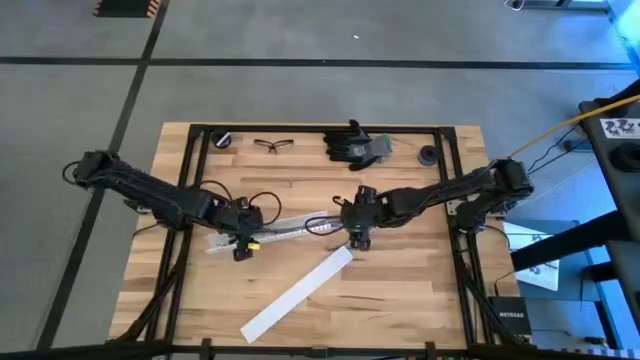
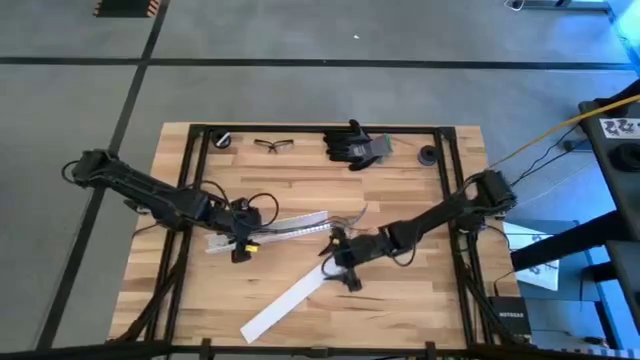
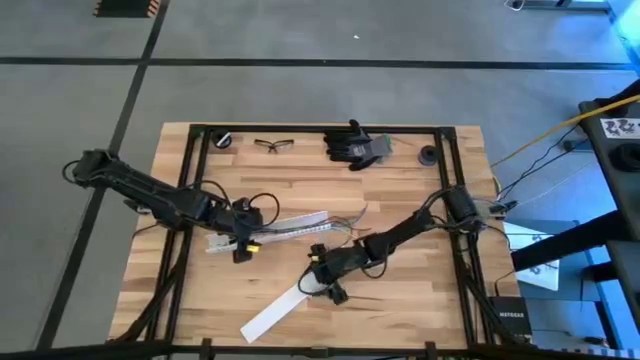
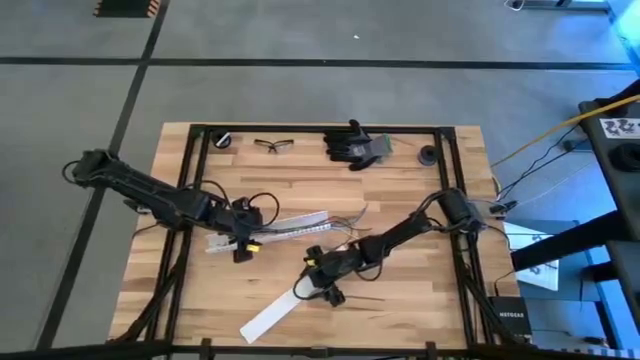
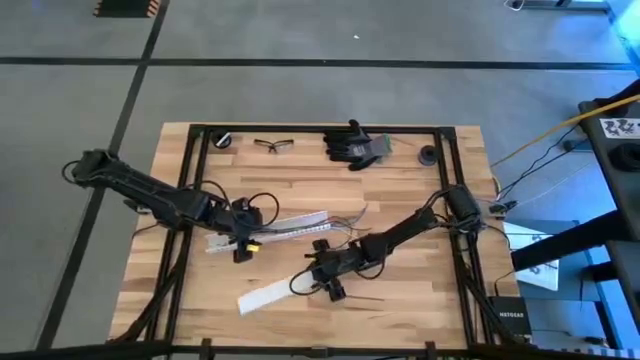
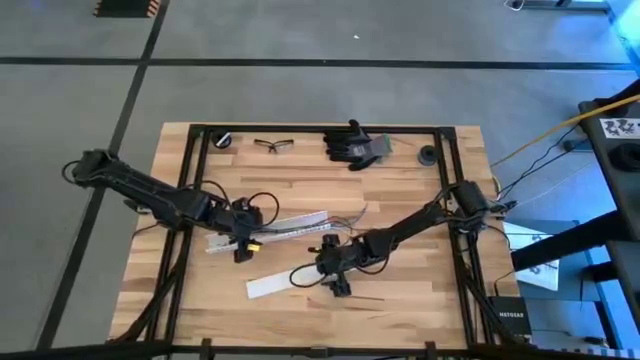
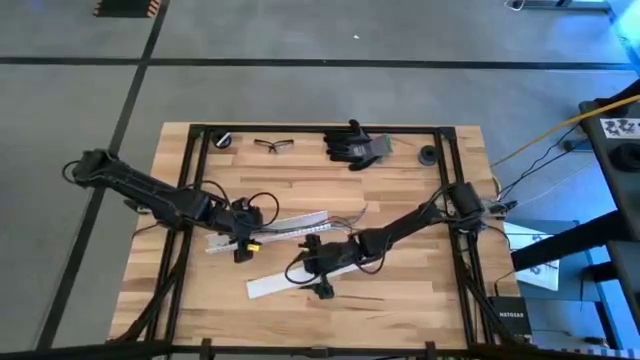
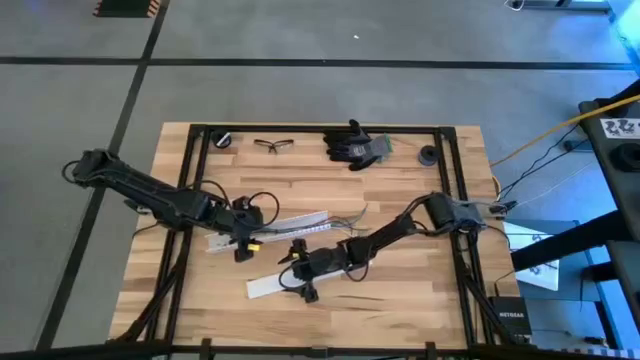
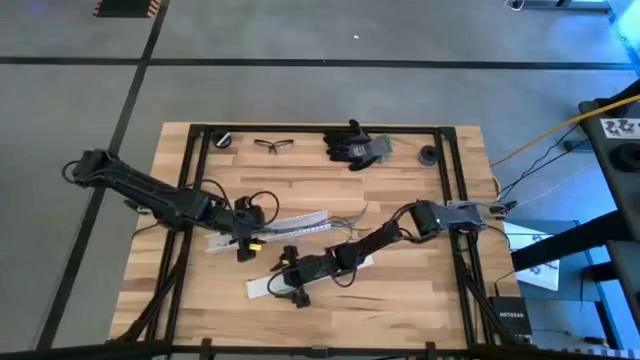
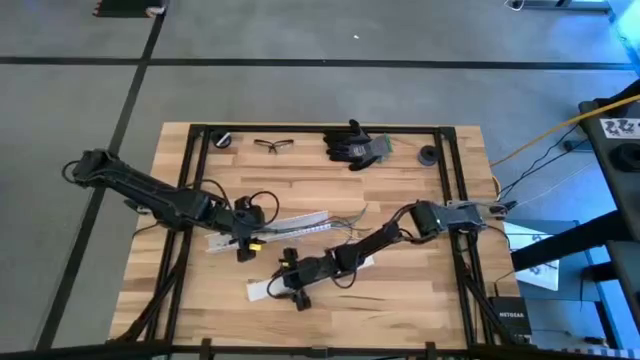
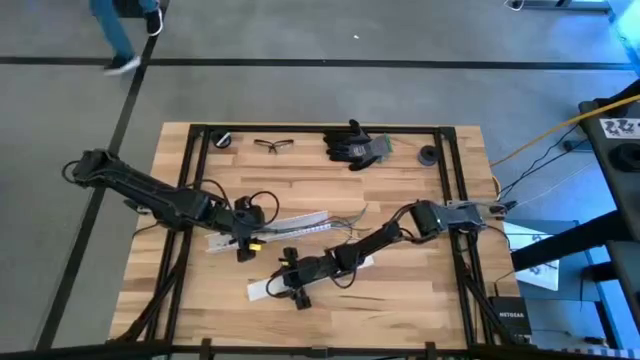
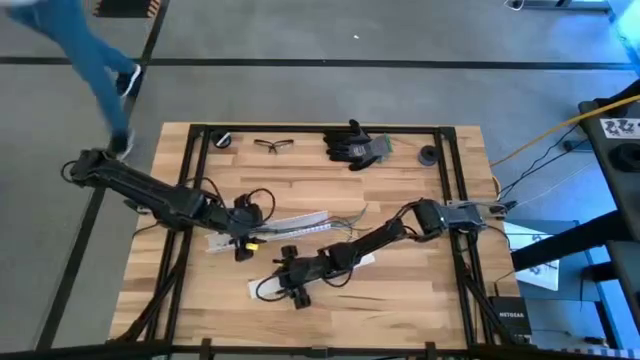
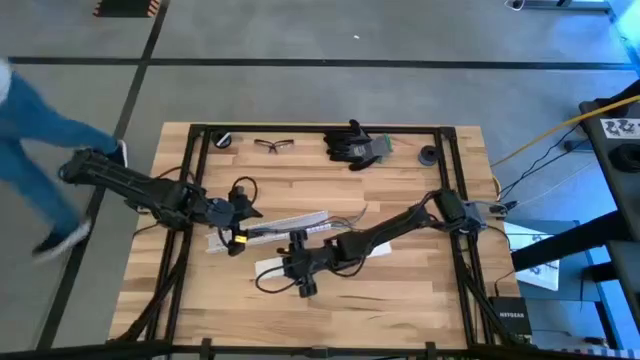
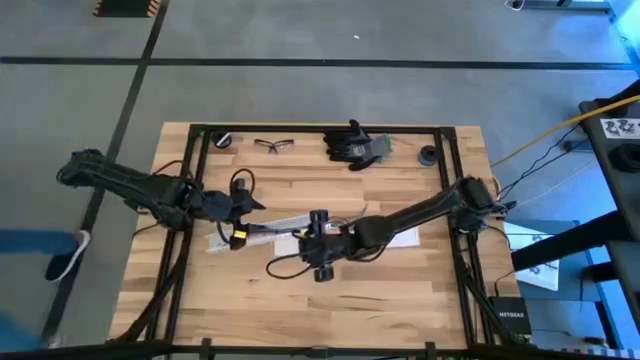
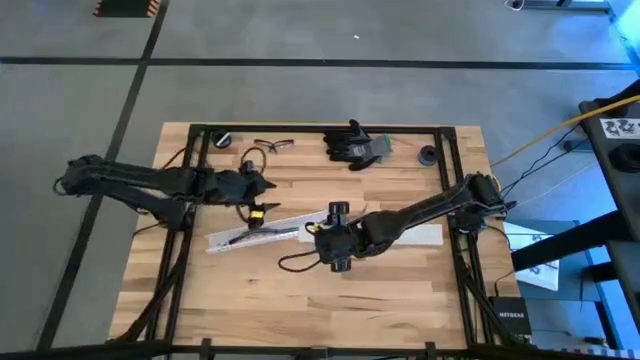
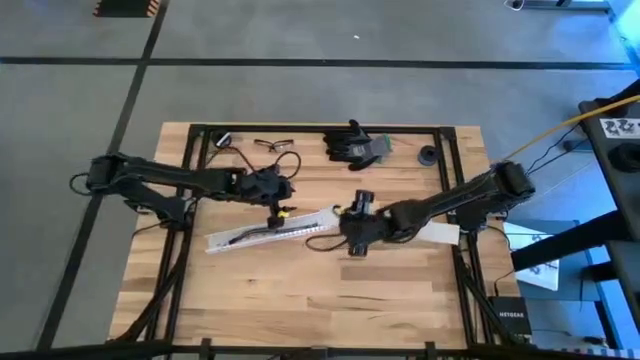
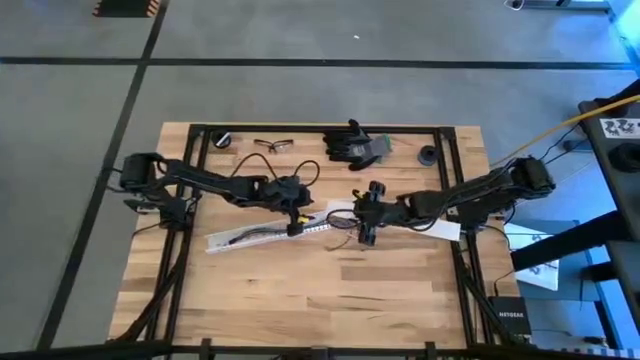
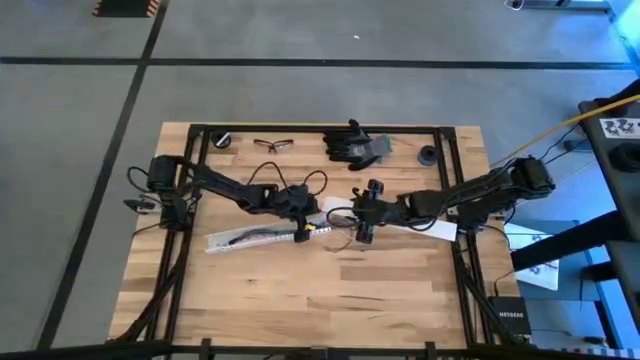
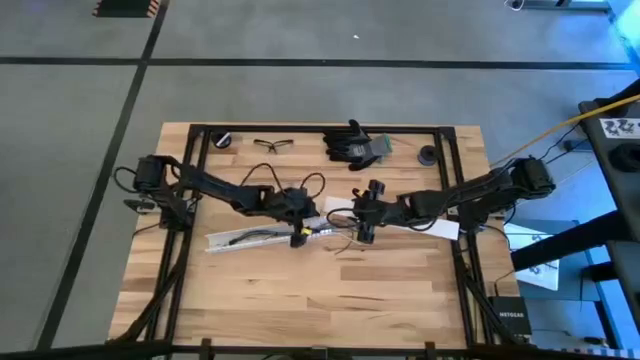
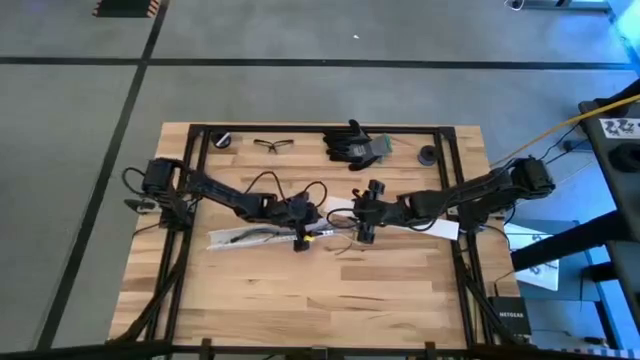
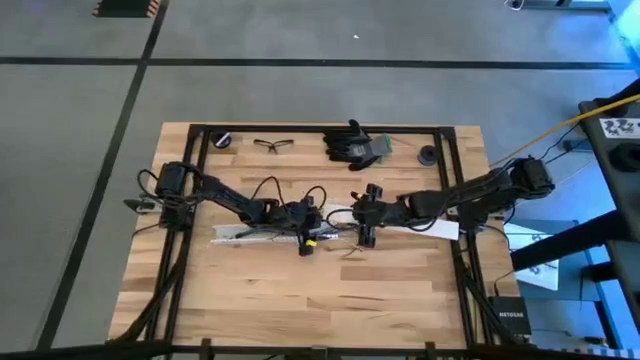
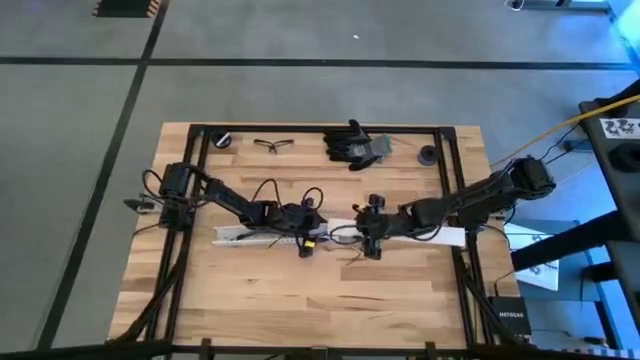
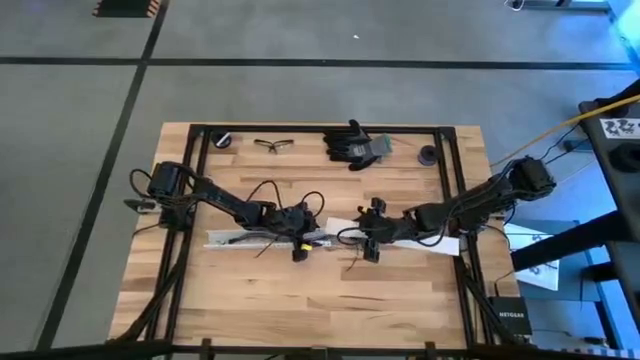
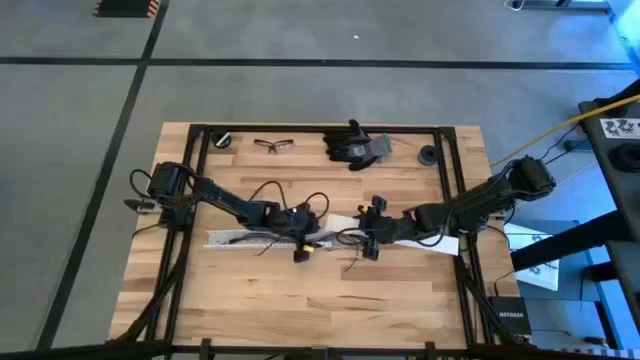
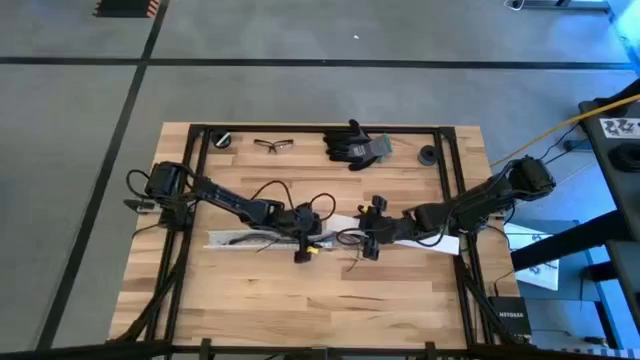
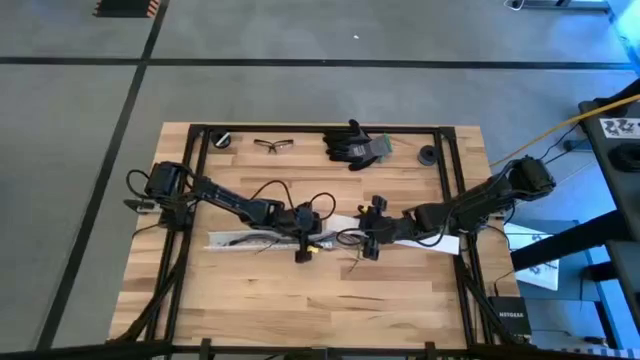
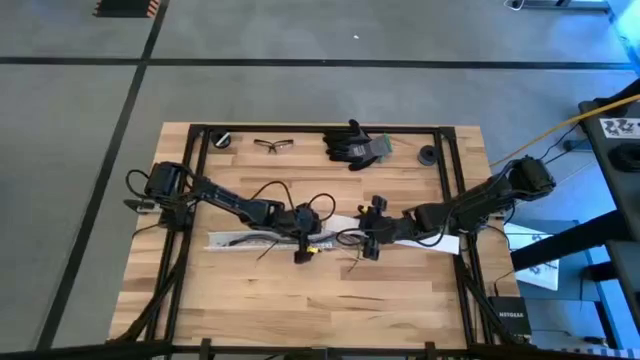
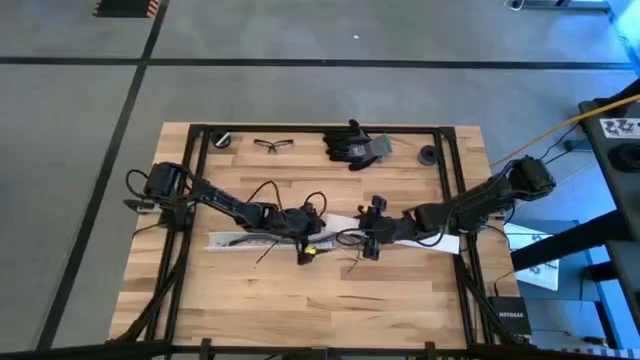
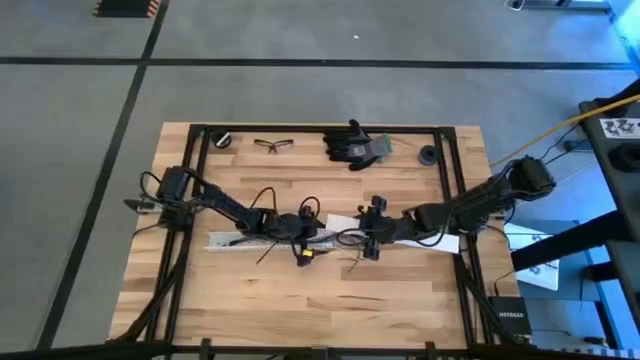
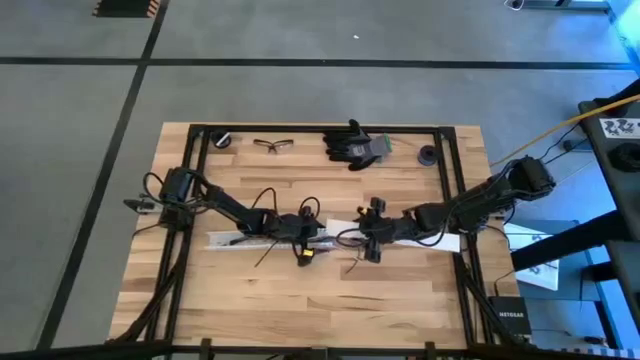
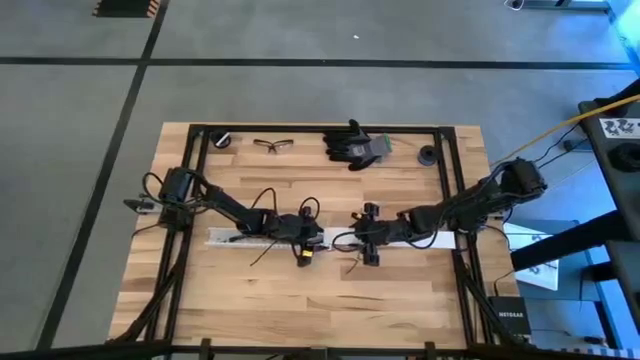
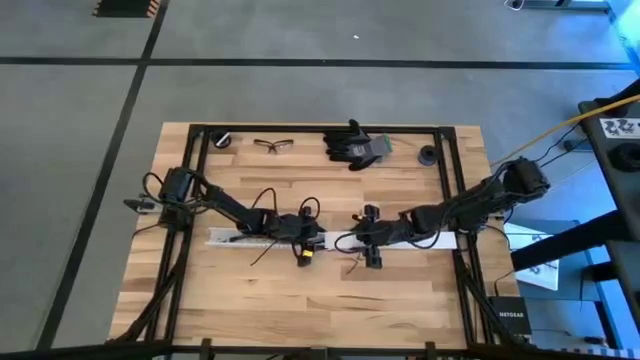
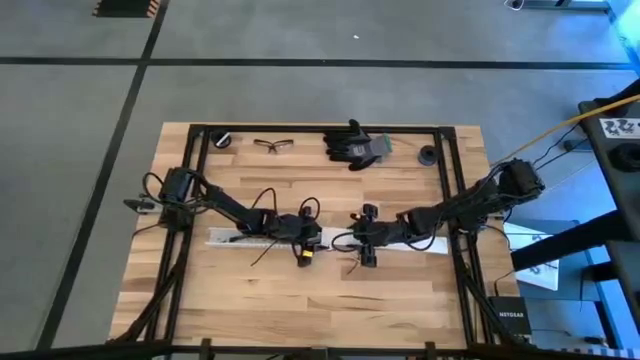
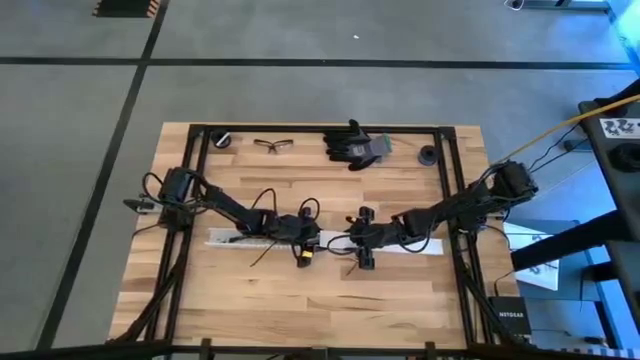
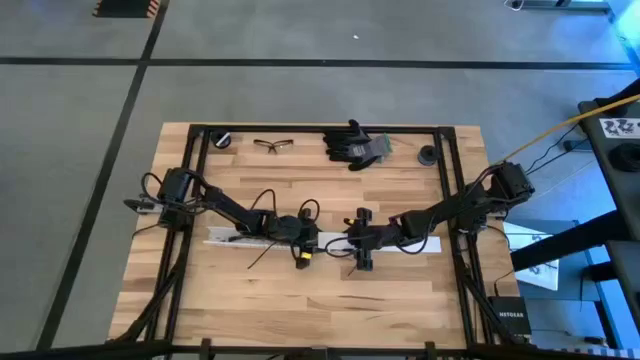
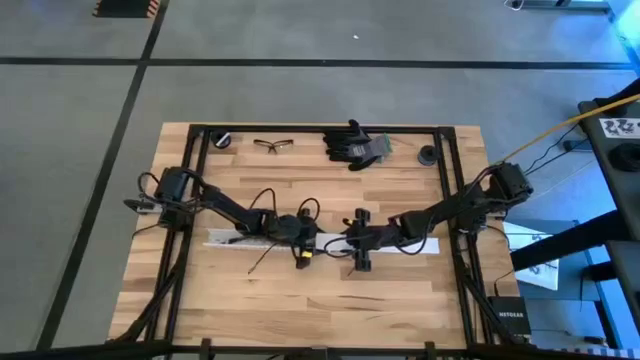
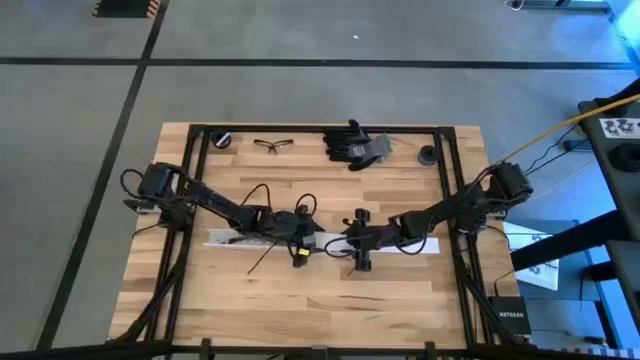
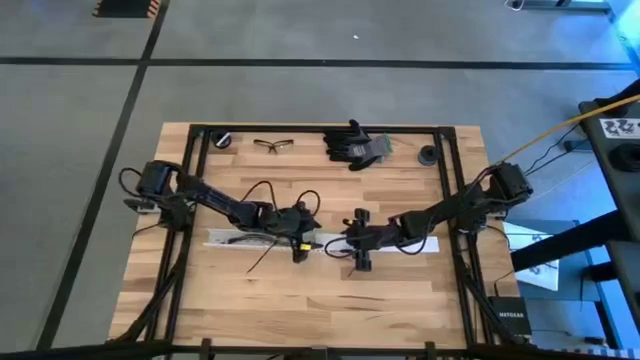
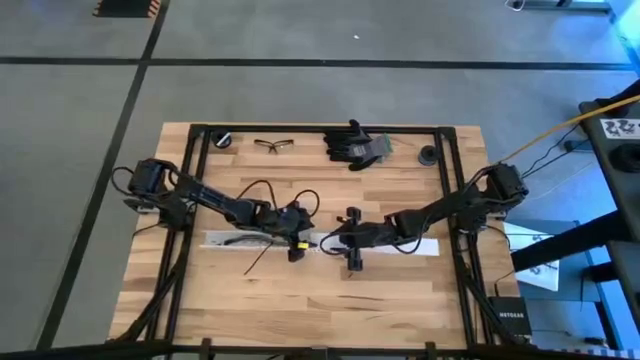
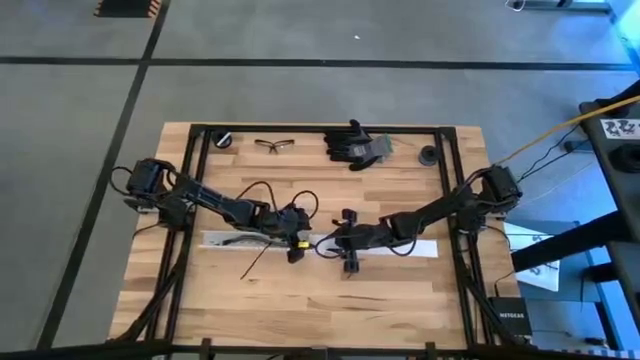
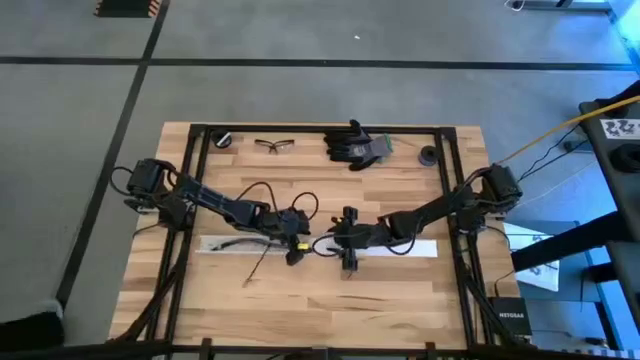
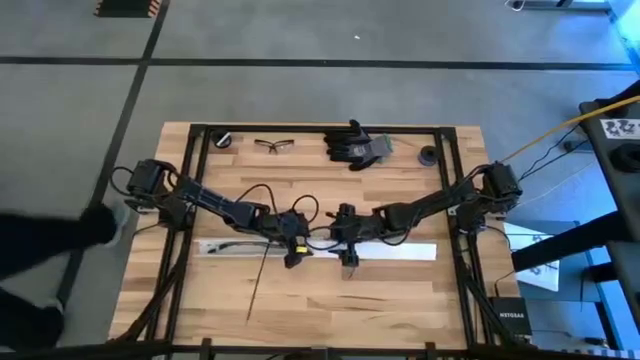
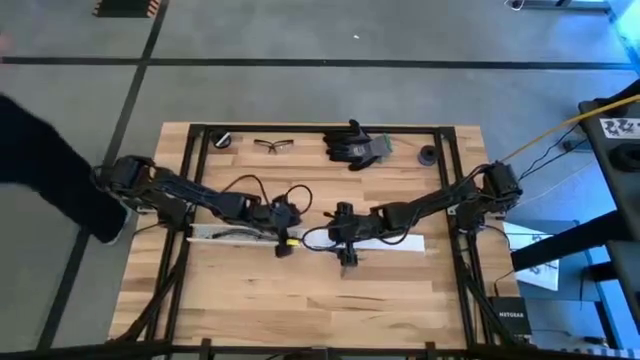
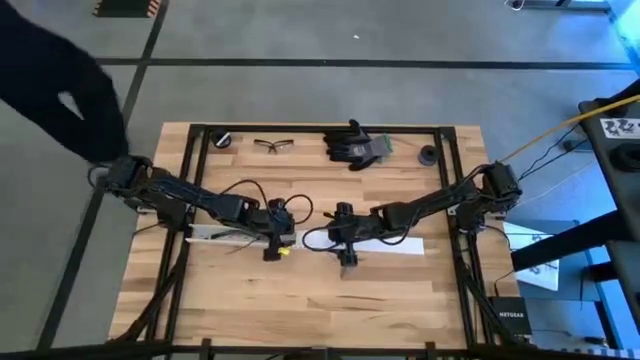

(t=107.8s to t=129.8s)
Task: Ziptie cables
Close the white cable duct
